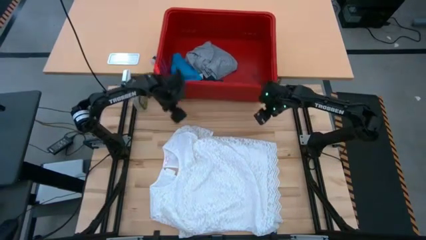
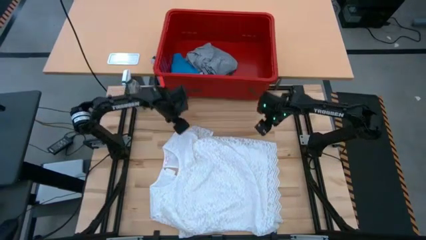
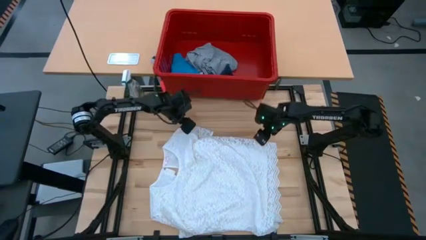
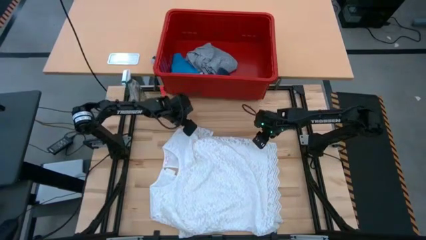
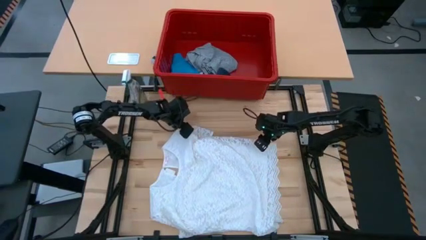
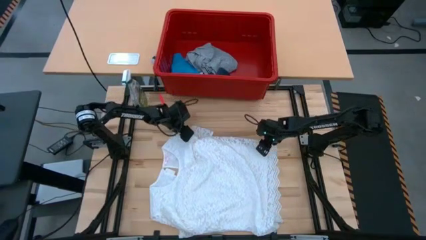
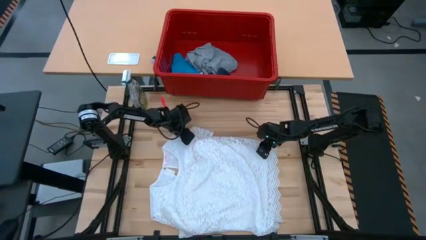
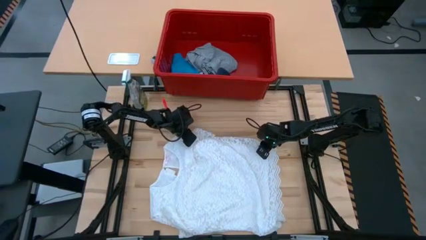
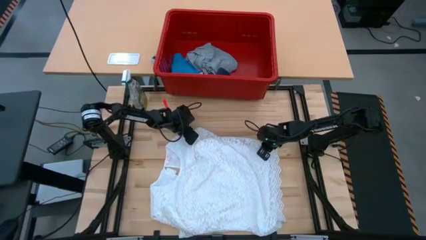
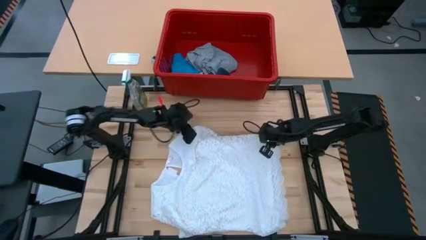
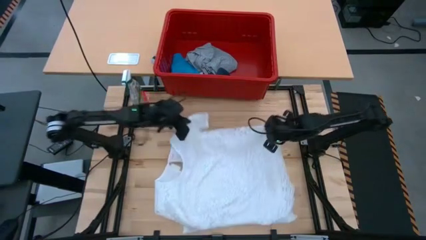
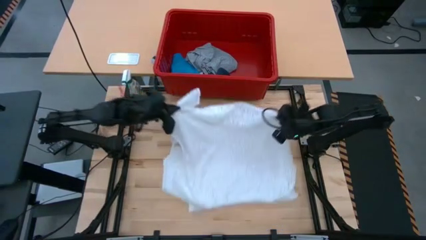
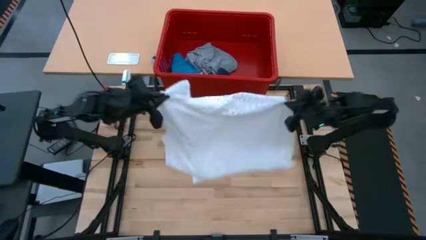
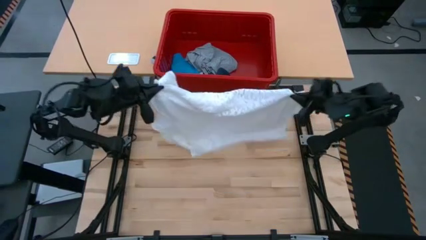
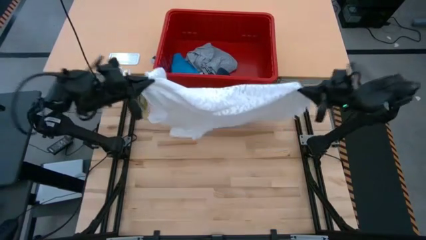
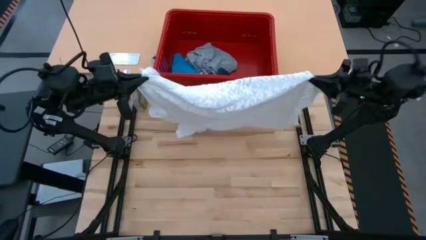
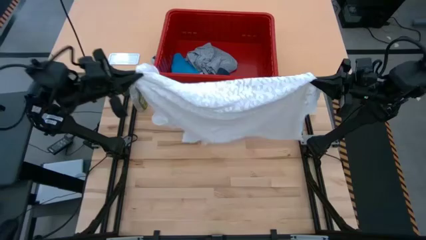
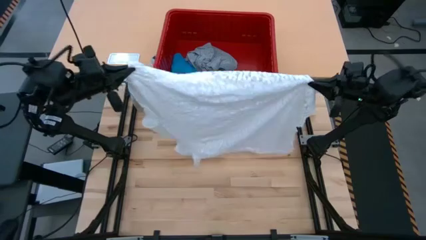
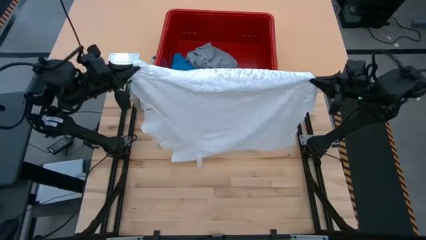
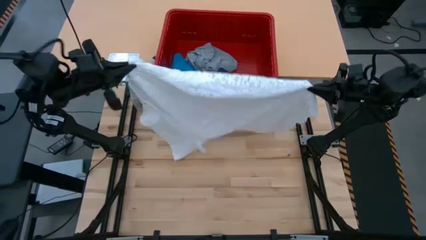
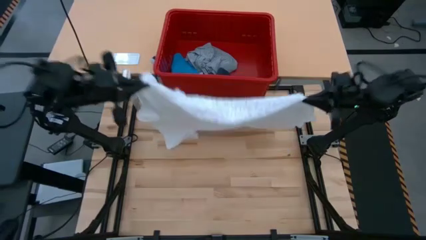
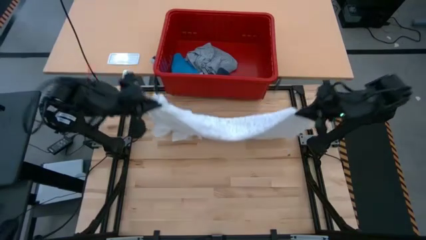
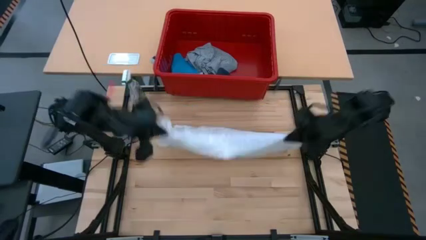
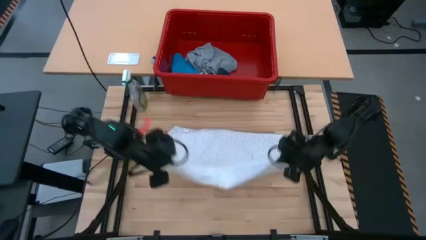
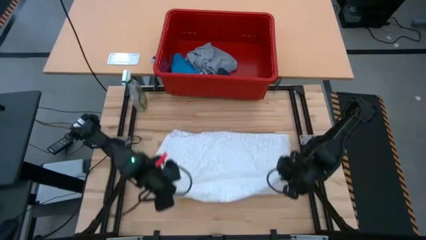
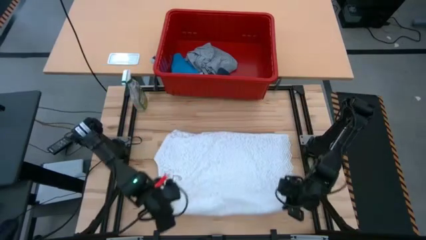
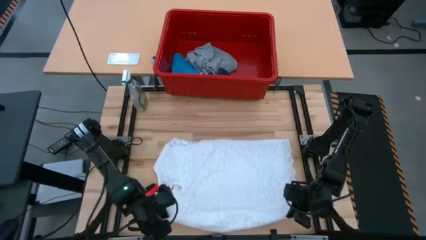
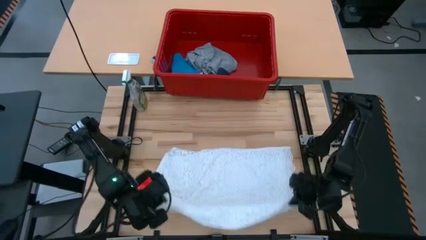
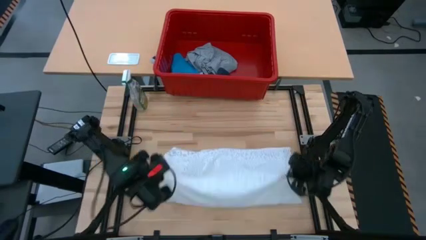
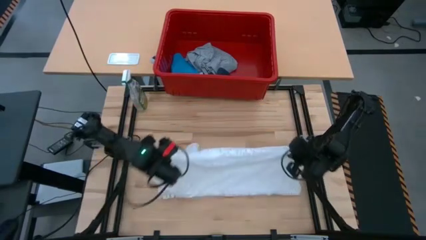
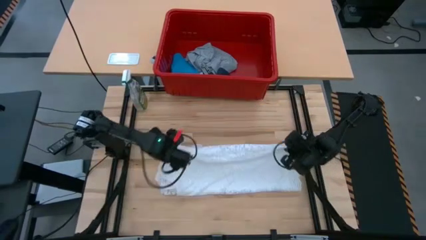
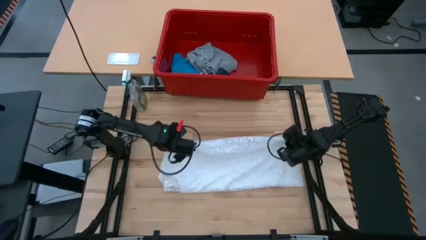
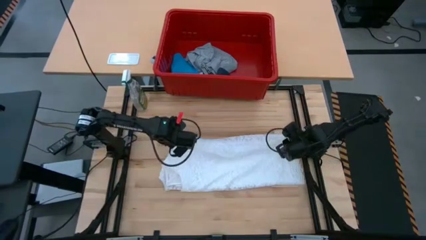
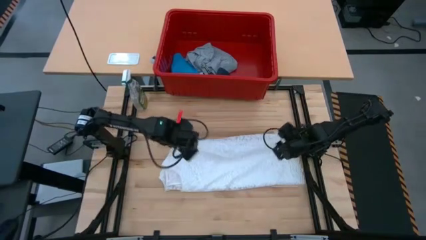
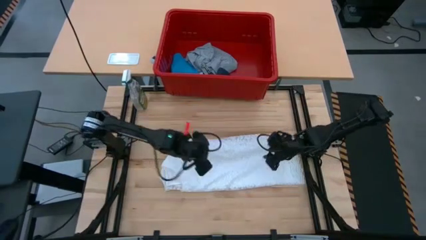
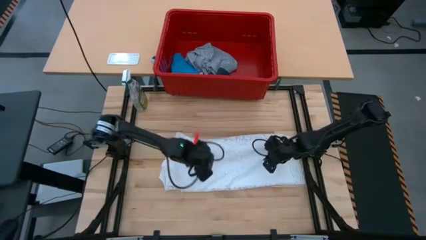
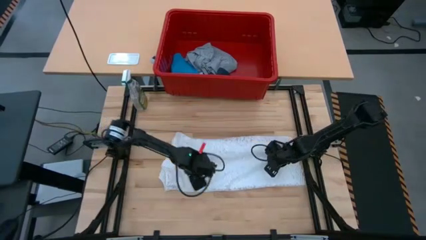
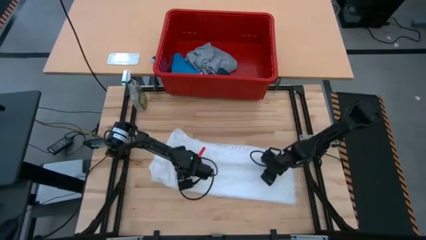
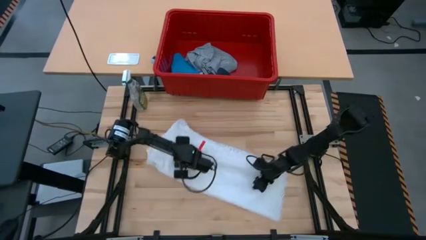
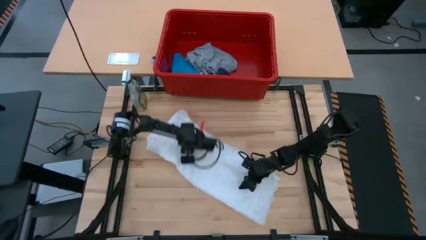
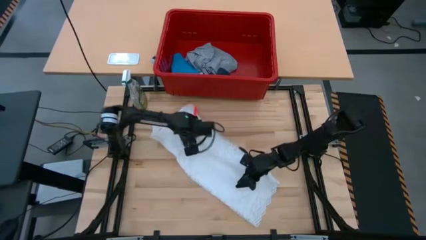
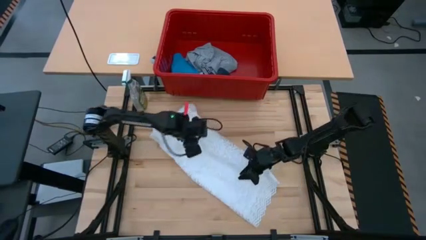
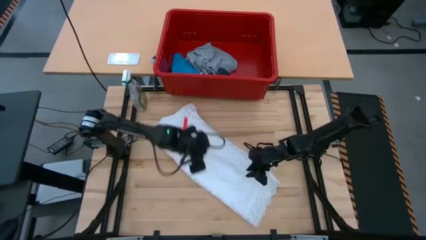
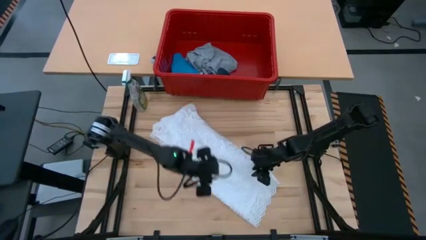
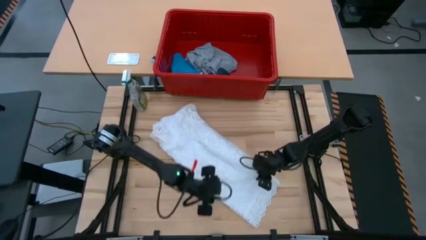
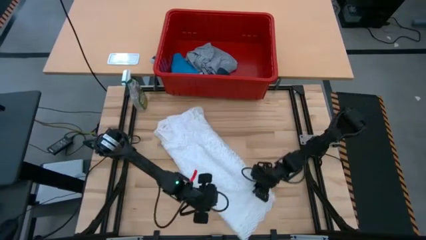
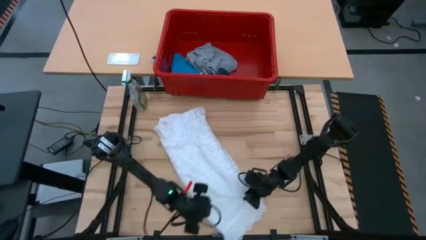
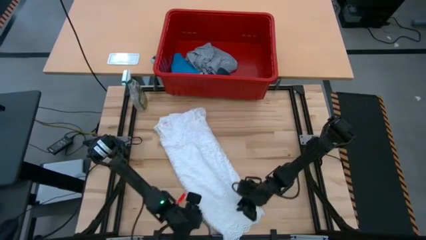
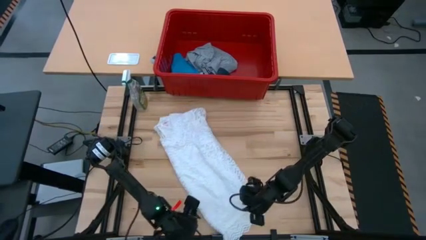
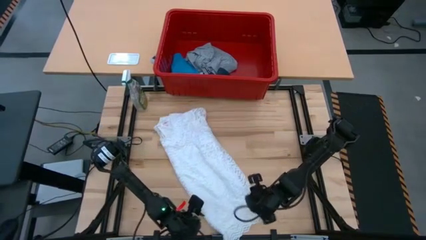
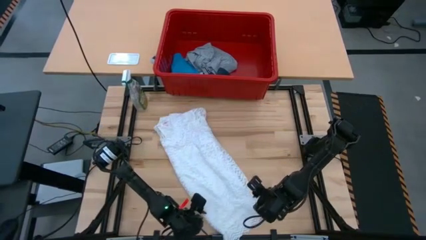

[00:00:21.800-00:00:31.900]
Task: Fold laundry
Fold the white dress on the table

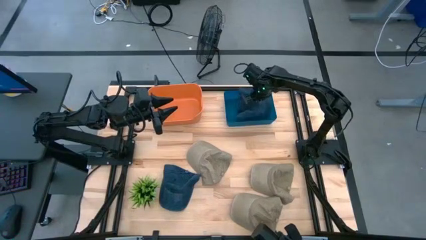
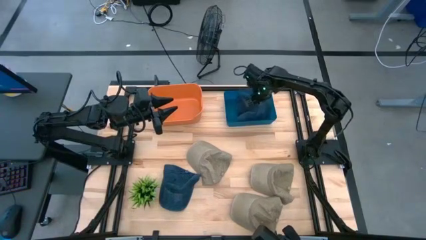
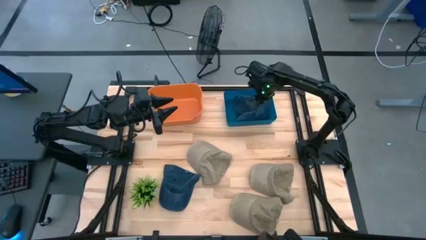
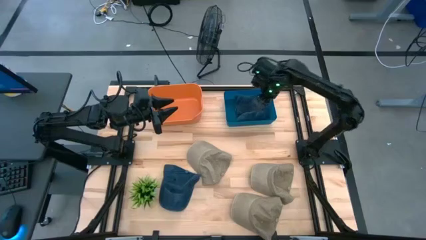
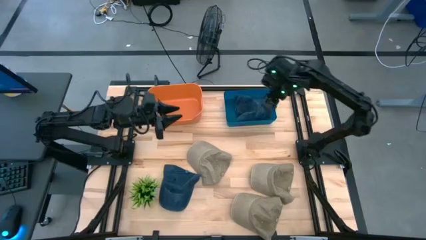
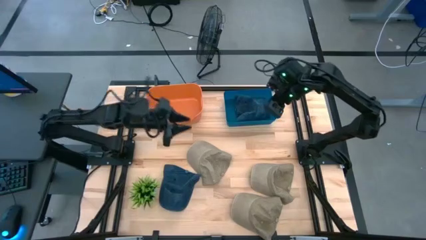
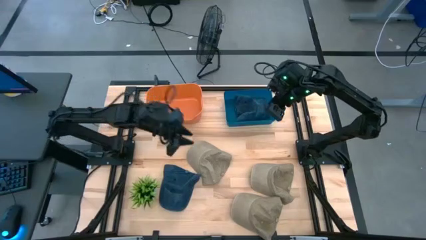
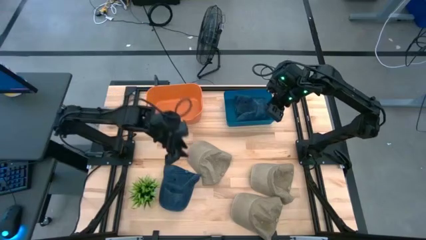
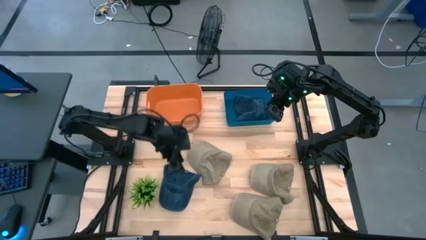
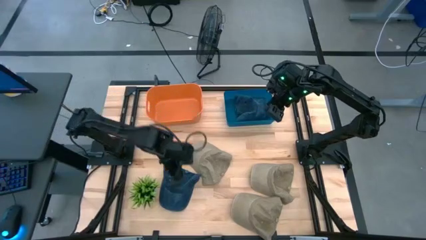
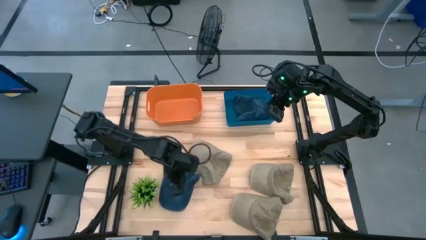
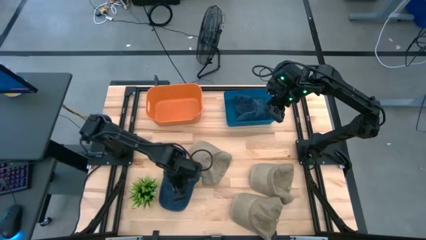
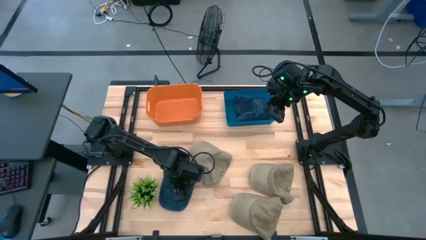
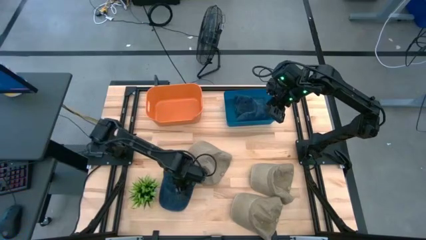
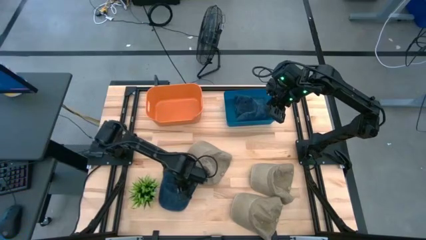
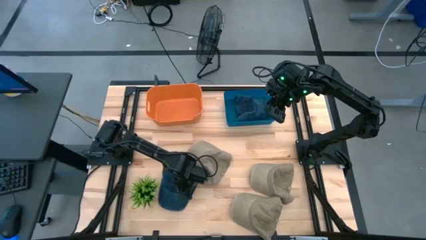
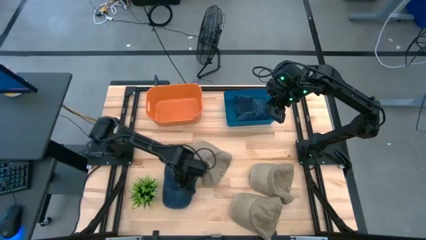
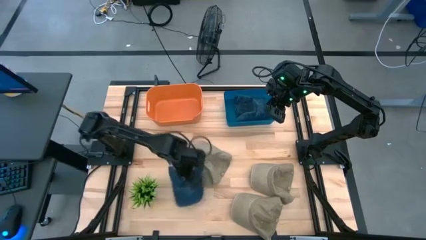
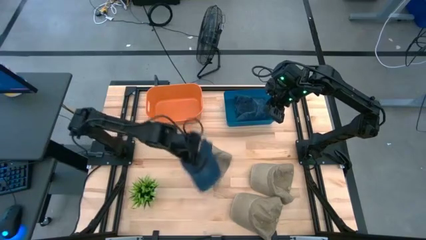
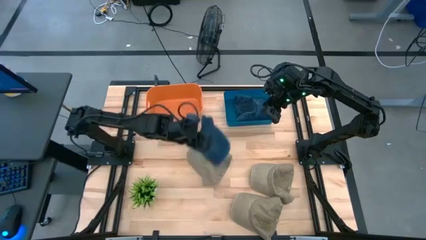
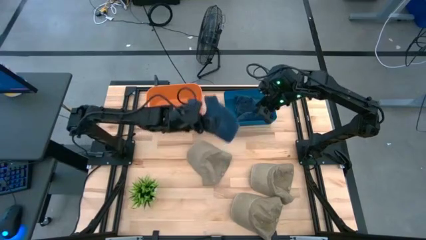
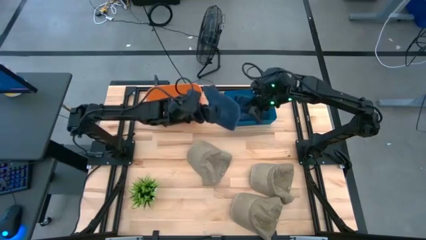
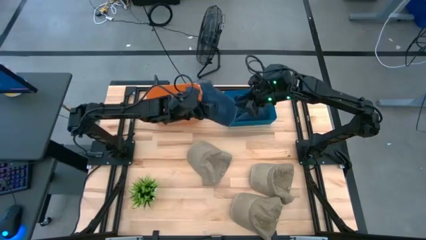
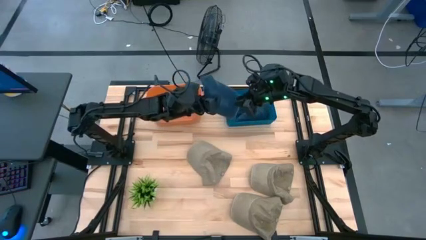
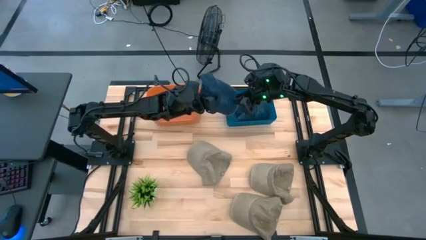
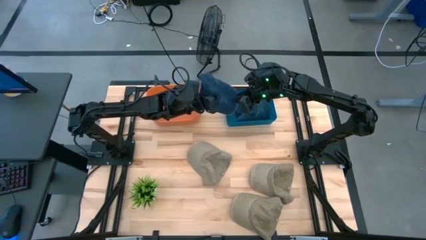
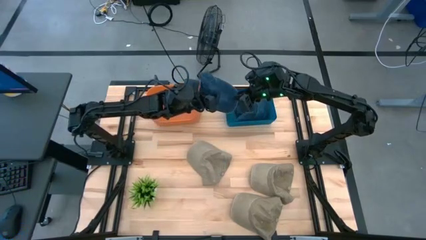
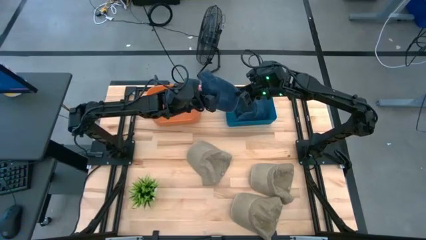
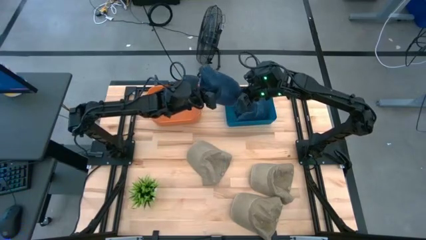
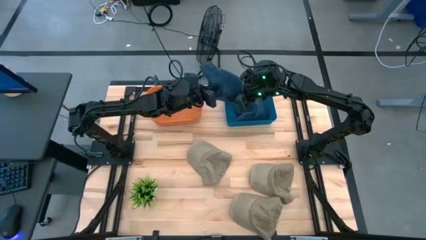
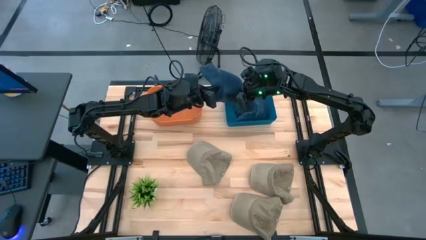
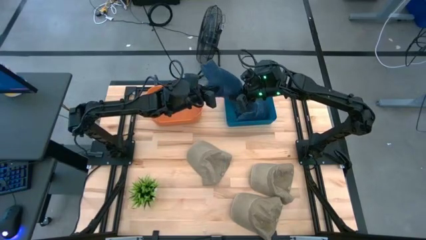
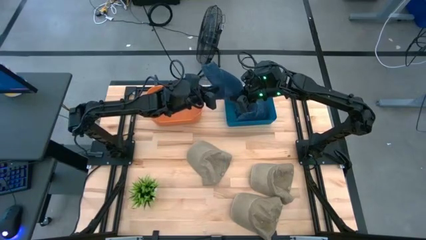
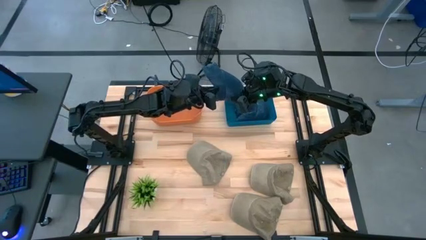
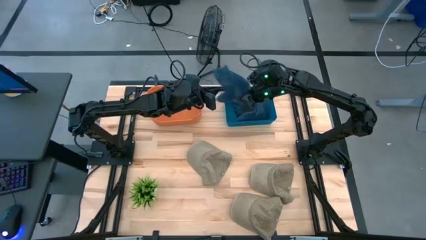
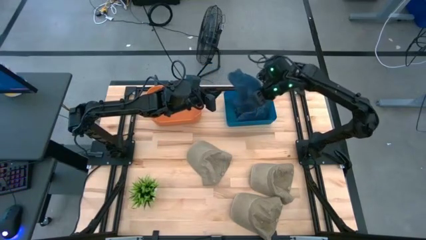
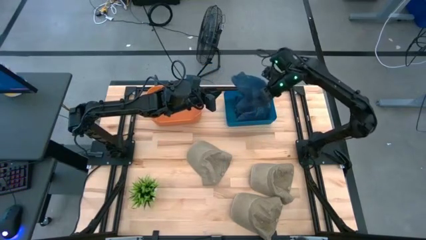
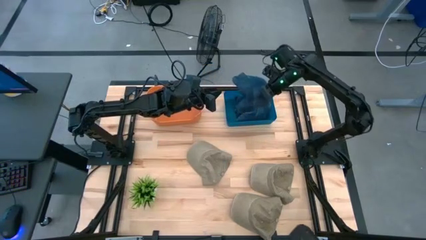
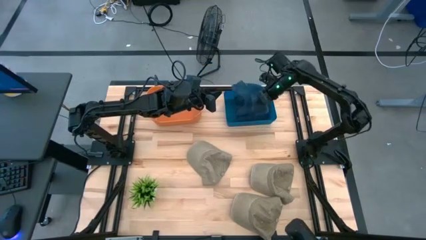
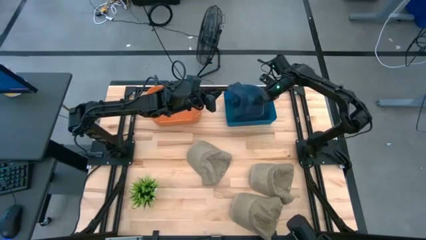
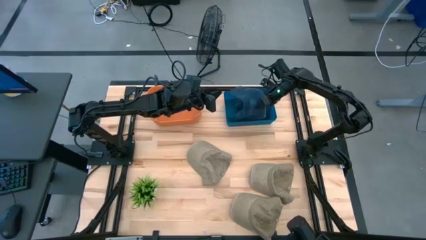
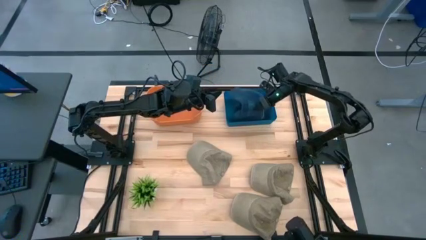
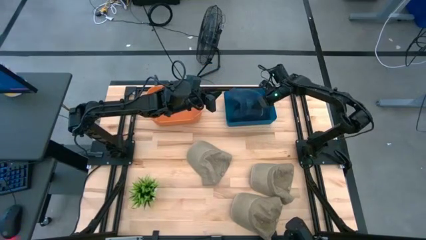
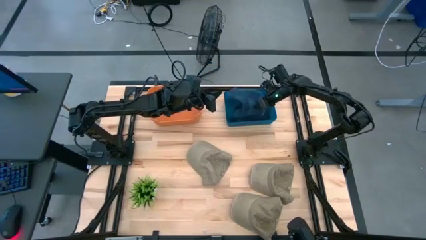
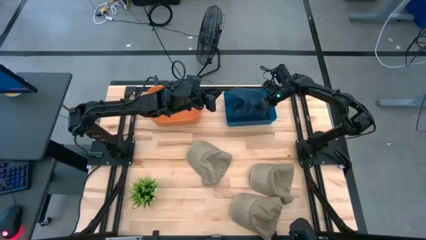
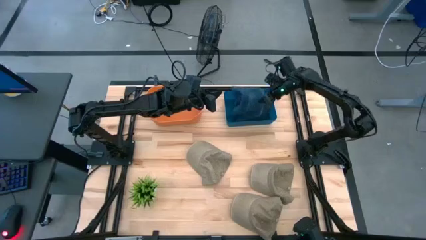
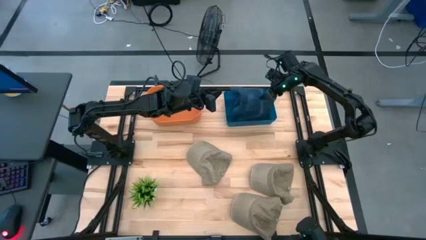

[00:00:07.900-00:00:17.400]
Task: Pick & Place hat
Put the blue cap into the blue bin
